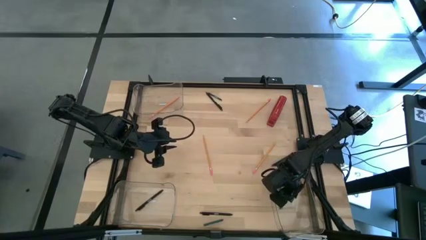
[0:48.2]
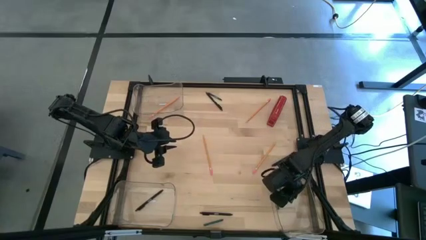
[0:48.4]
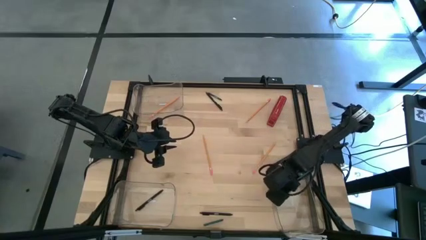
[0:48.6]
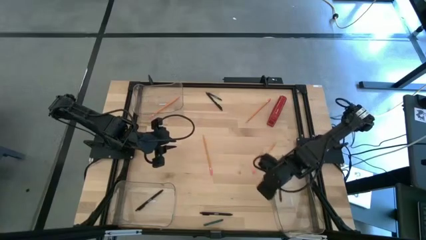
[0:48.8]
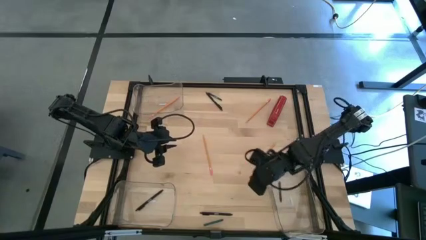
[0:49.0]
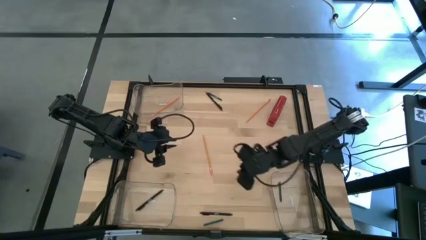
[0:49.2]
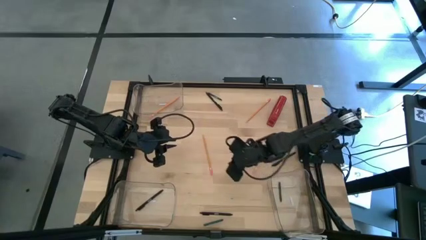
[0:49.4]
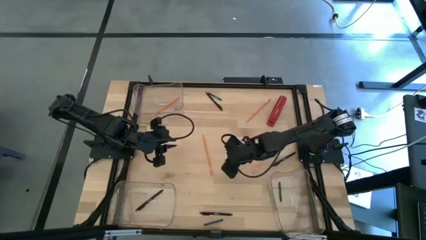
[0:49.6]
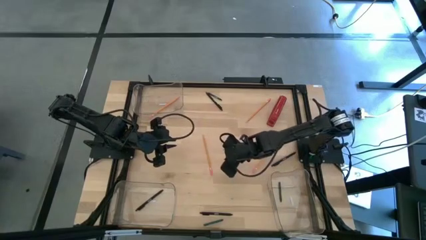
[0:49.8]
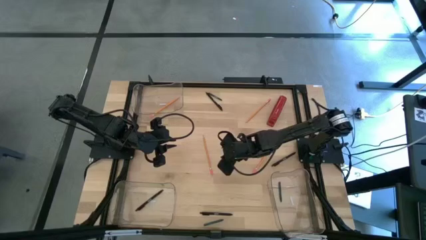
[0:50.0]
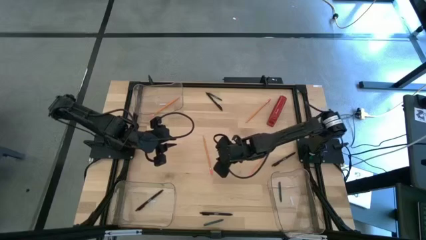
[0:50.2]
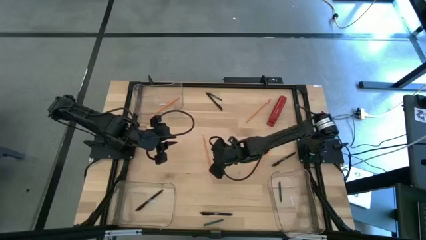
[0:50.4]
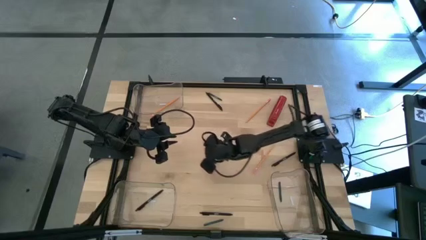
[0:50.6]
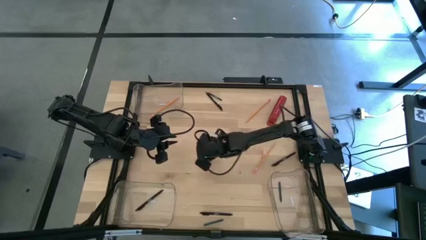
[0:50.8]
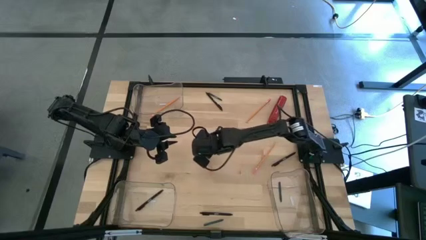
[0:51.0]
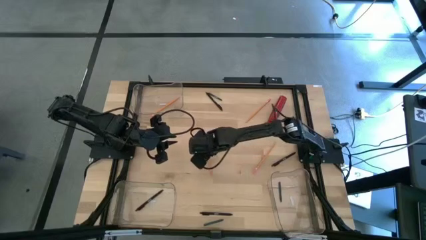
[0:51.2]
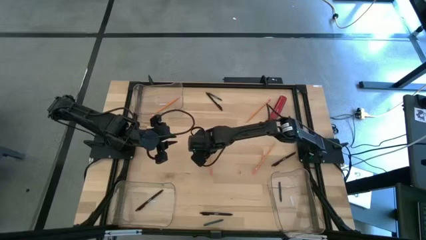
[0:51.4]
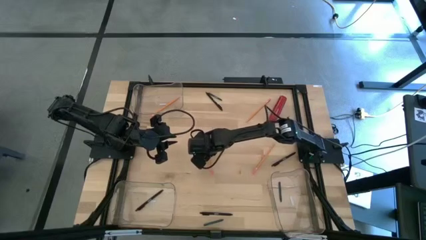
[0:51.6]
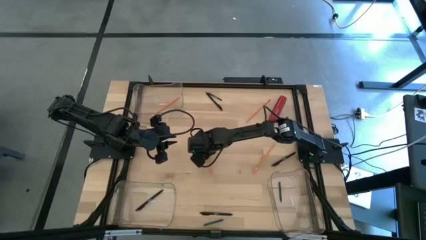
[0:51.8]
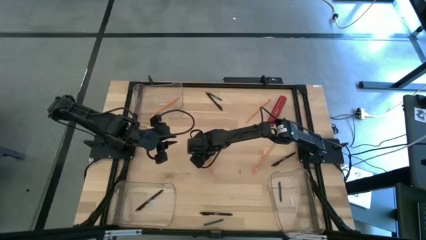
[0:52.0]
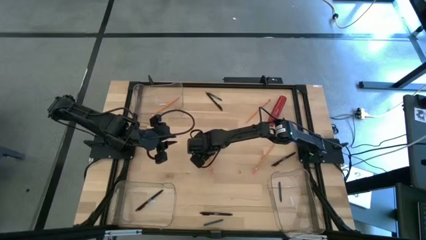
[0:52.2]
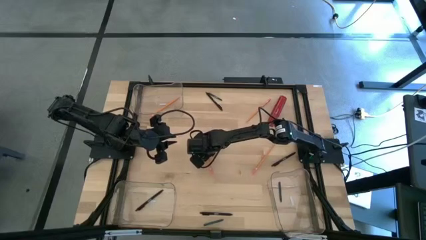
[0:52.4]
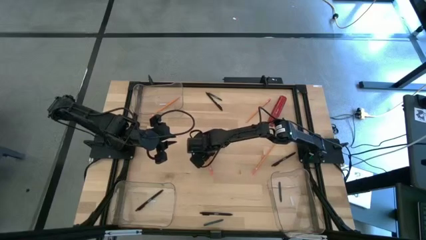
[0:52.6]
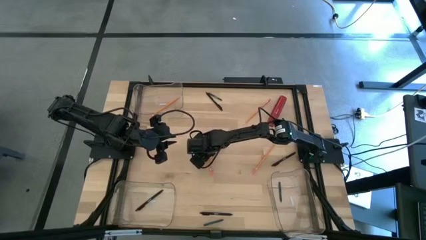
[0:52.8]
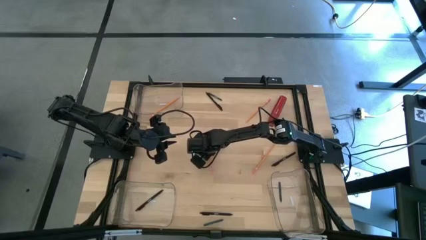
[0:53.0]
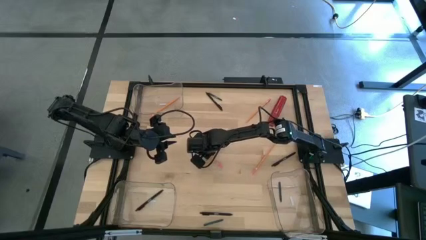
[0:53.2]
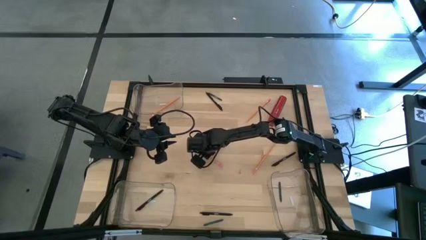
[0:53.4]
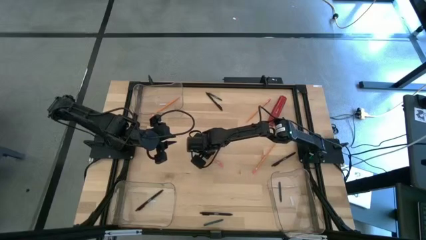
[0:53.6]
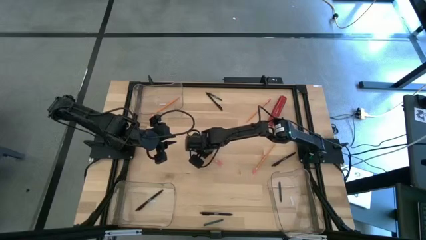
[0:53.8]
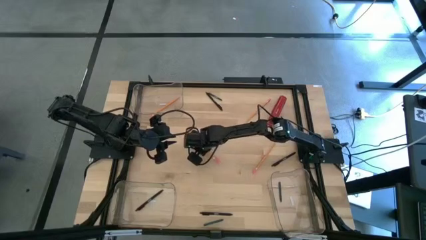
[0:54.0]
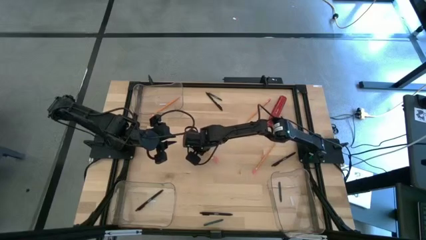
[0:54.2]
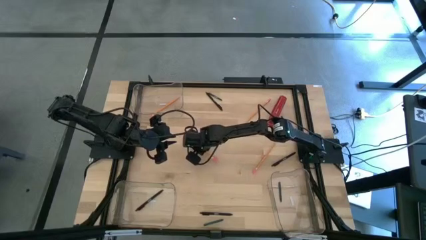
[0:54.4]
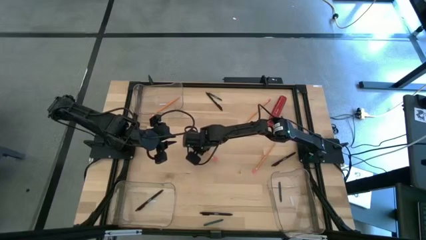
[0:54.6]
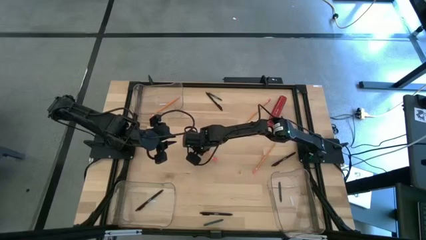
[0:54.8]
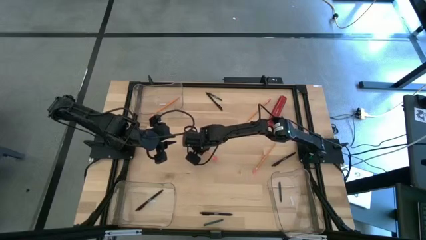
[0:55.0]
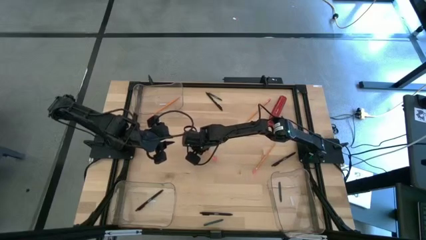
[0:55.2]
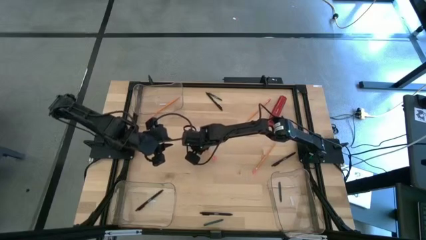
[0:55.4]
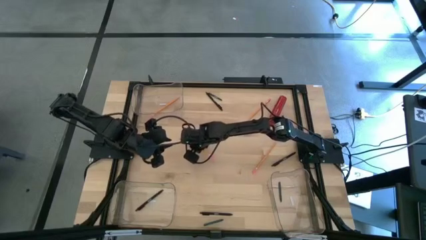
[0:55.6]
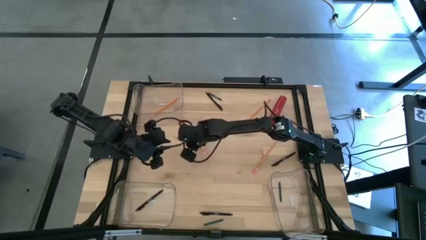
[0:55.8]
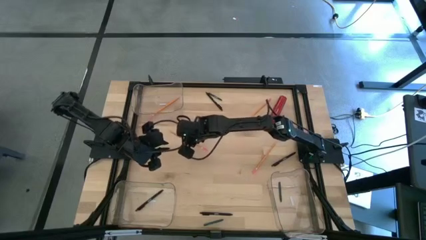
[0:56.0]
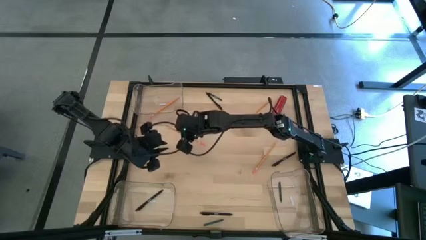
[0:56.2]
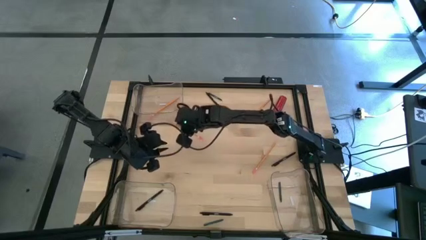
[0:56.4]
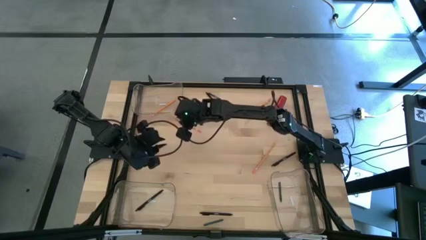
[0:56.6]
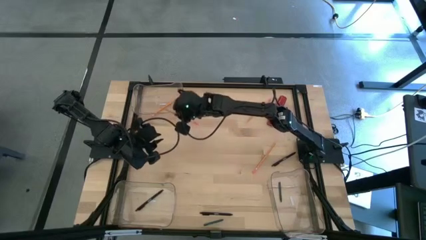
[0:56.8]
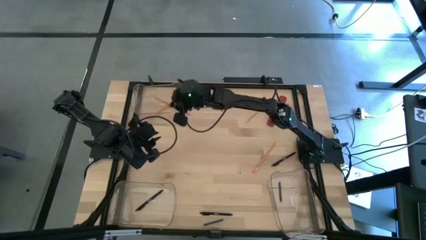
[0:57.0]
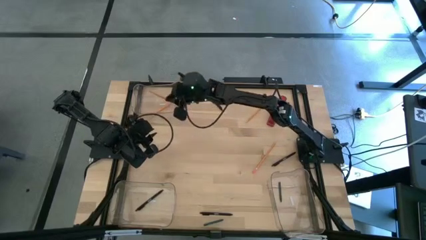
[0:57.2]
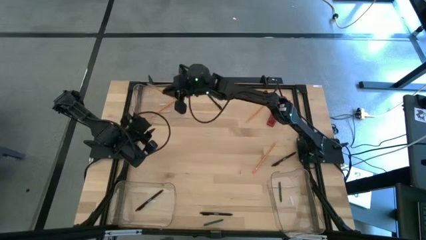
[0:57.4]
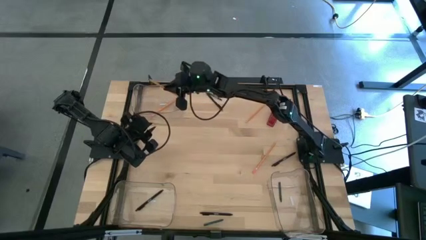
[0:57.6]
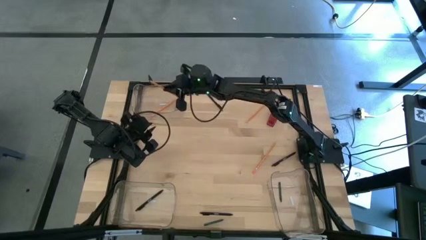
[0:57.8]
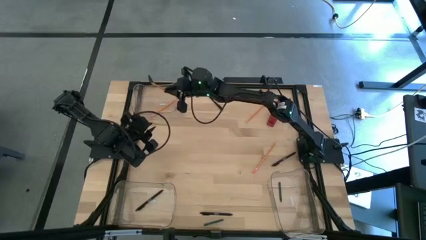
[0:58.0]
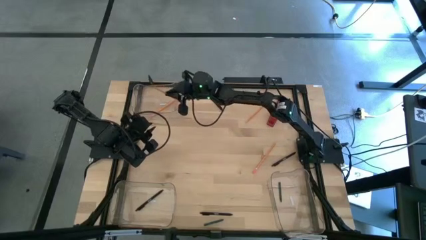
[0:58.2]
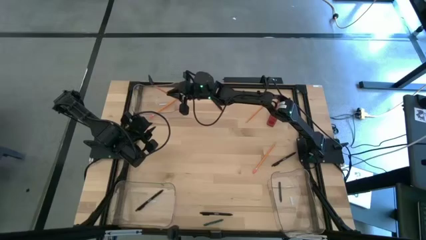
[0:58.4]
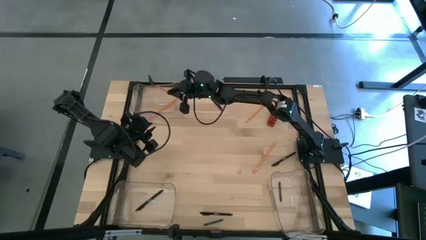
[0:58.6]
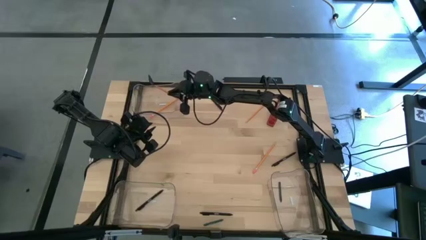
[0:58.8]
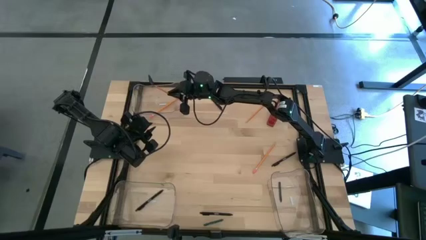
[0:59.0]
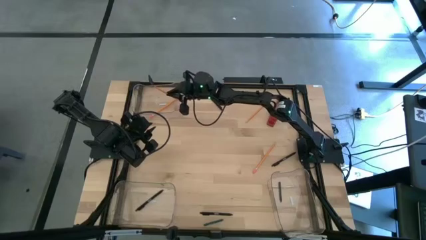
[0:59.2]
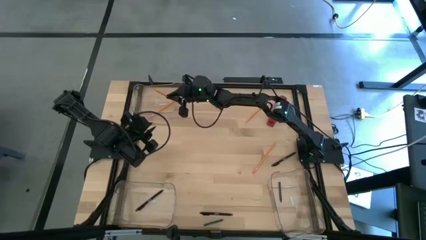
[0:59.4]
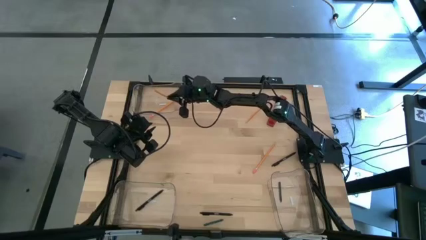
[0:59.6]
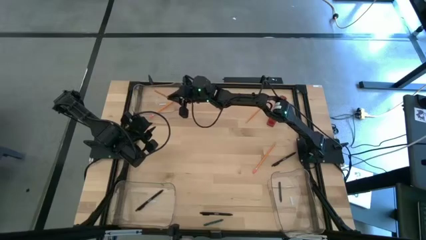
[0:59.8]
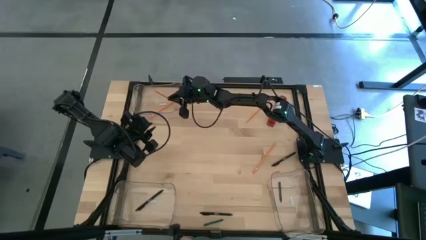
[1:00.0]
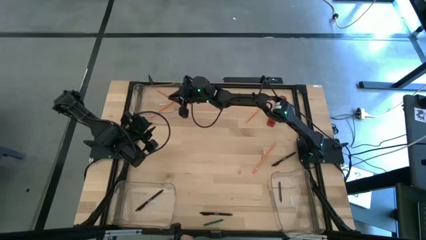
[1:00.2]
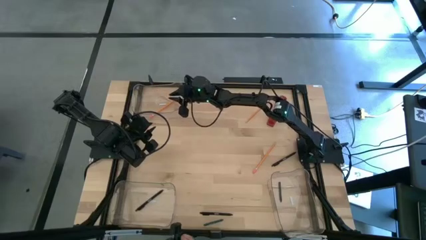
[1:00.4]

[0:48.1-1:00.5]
Task: Sort crayons/erasers/pens/pencils in bins
Put the orange pencil into the top transparent bin

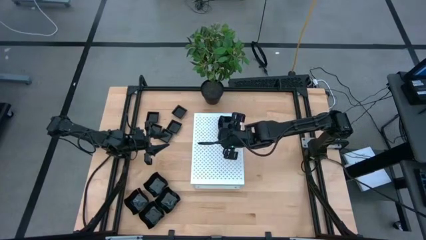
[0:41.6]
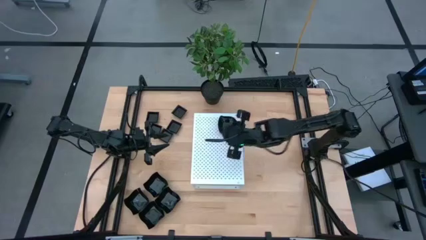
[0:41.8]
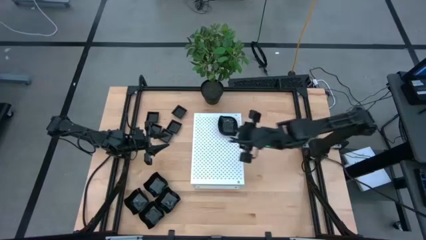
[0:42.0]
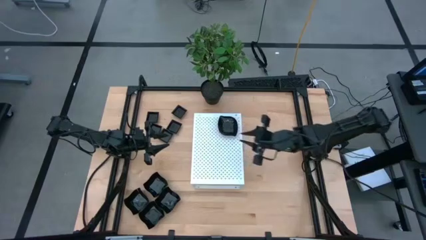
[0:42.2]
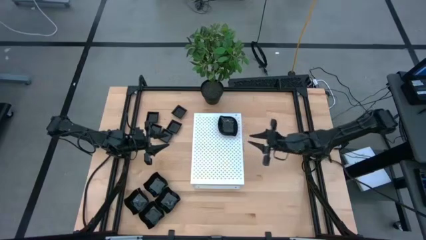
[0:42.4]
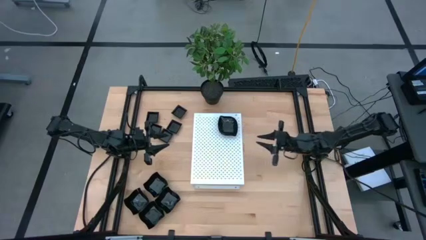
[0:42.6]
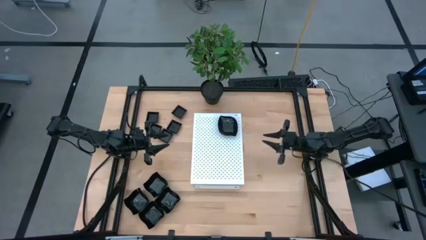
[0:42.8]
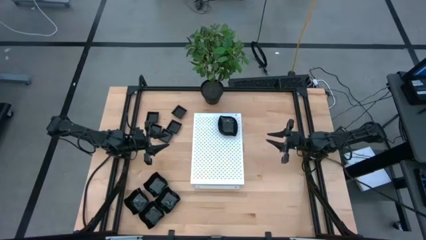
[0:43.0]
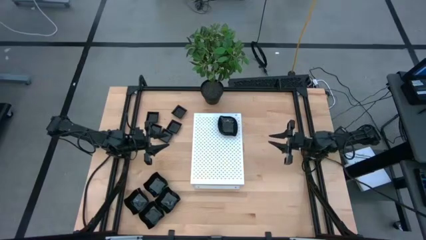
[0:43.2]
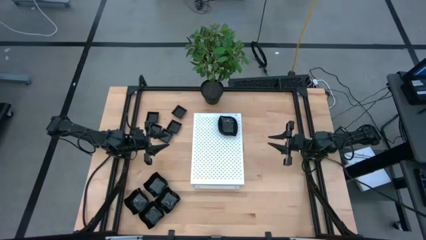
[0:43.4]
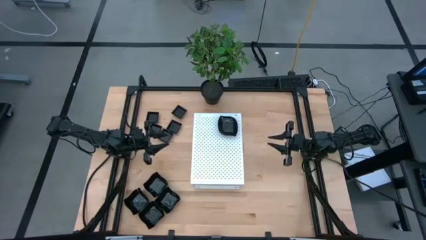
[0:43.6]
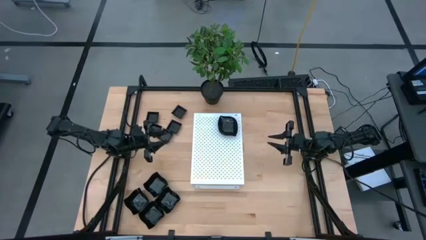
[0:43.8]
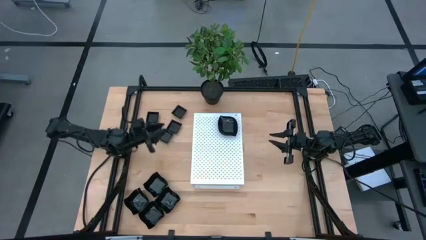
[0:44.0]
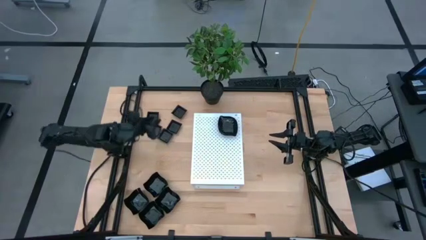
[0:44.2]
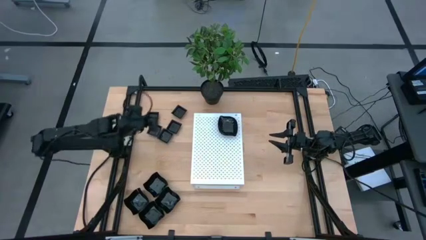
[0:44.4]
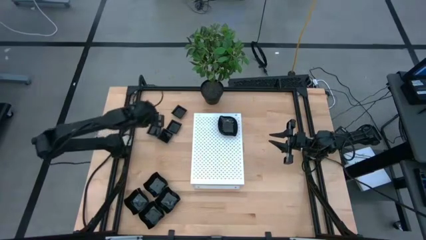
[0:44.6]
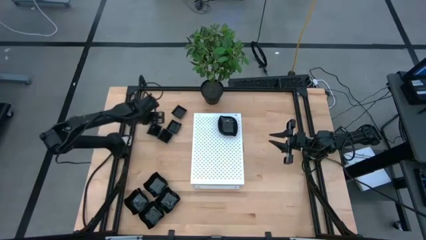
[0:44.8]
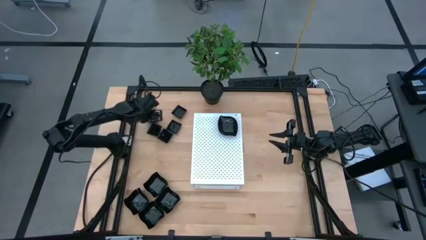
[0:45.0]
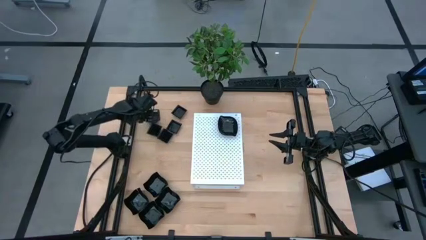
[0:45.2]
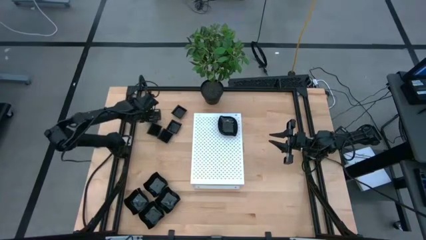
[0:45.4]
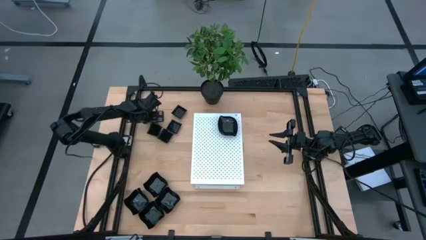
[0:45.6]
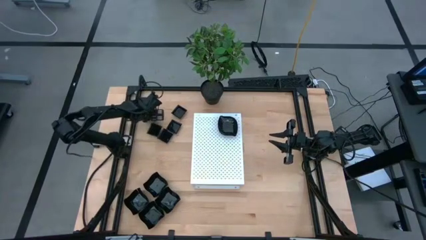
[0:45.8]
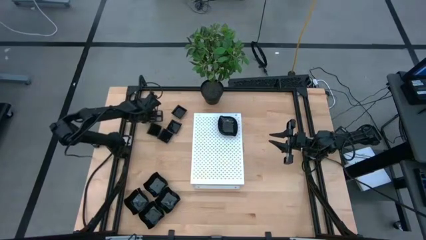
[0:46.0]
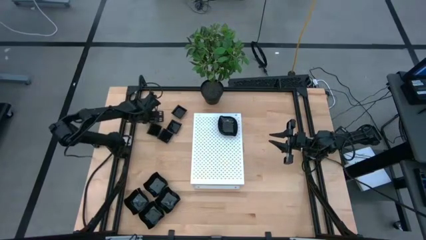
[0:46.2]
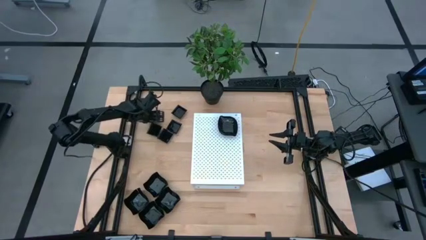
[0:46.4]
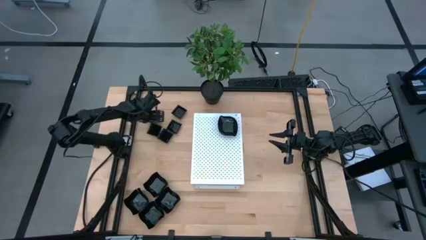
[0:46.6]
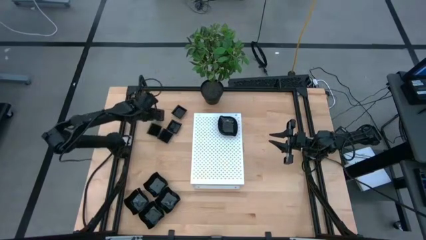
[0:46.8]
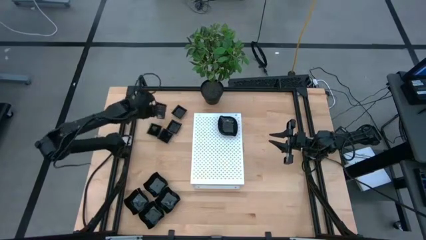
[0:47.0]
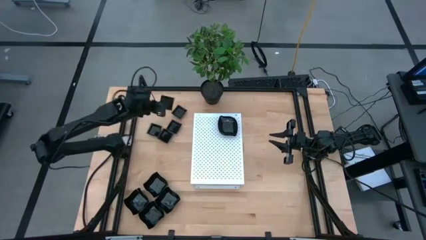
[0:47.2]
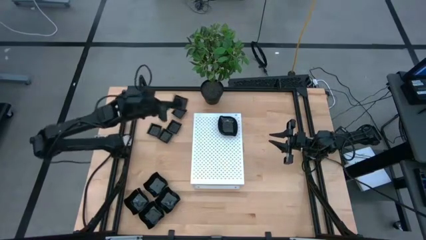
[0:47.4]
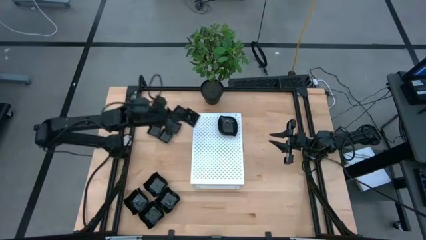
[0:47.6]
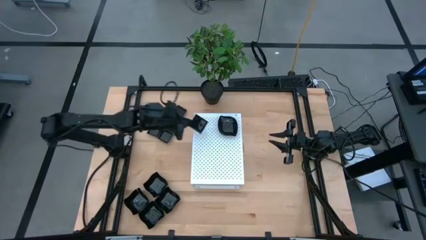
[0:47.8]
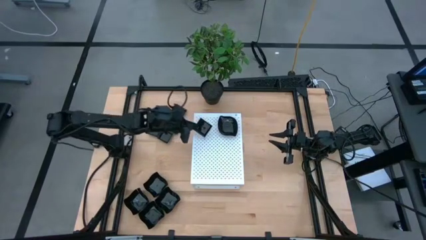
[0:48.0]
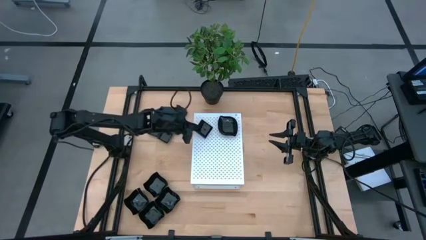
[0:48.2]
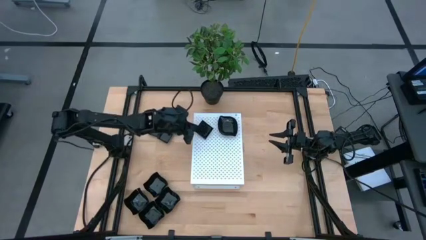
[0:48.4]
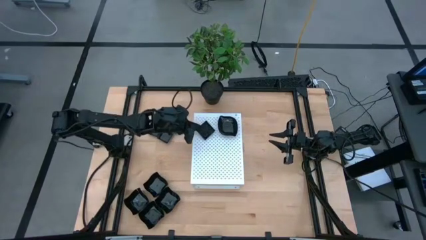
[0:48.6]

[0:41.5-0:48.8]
Task: Pick & Place Mini shaped plates
Put the black square plate on the shelf
